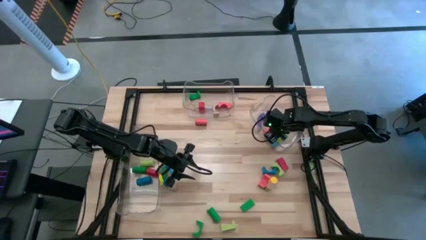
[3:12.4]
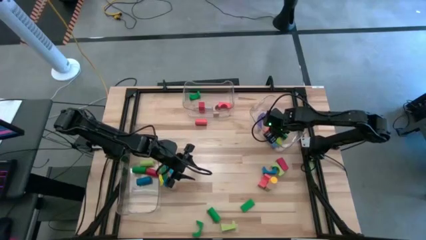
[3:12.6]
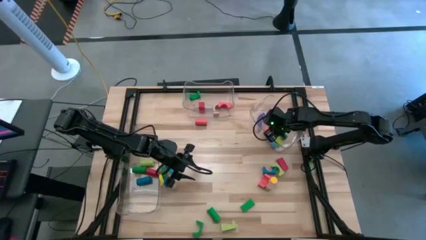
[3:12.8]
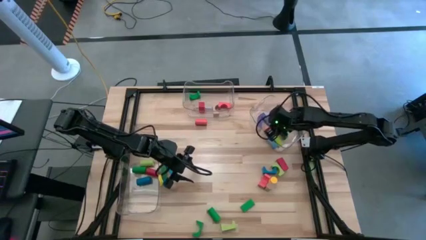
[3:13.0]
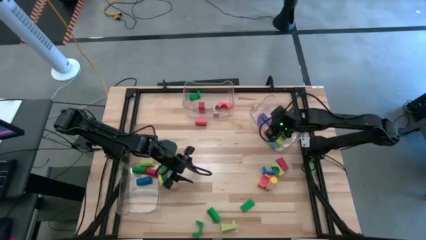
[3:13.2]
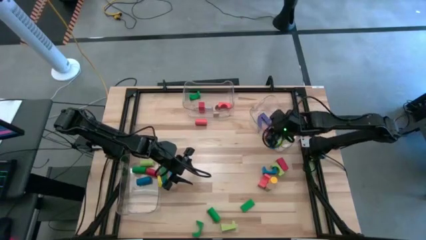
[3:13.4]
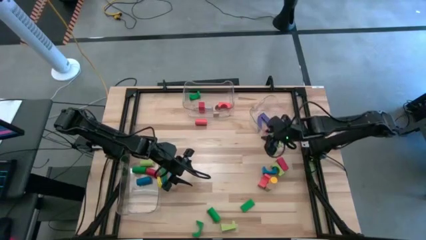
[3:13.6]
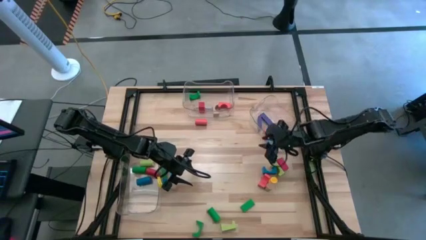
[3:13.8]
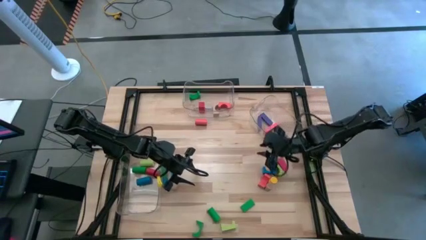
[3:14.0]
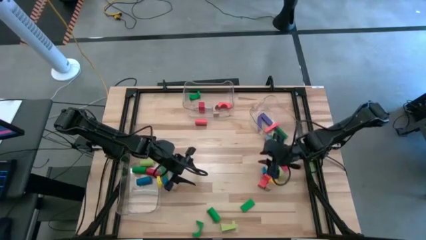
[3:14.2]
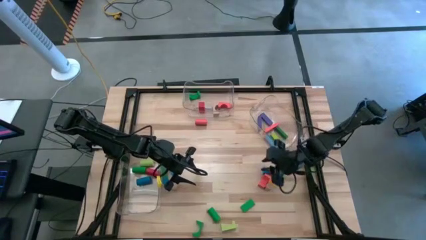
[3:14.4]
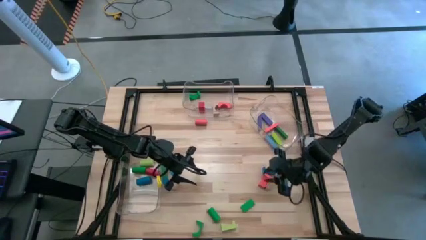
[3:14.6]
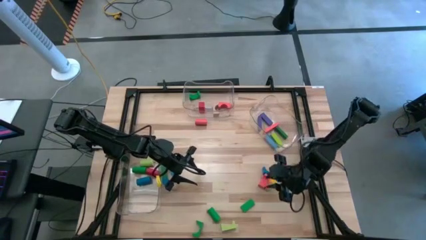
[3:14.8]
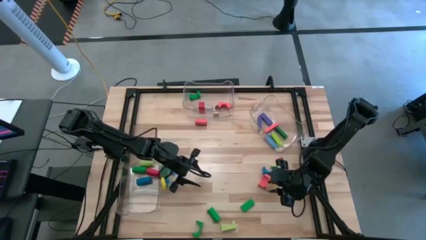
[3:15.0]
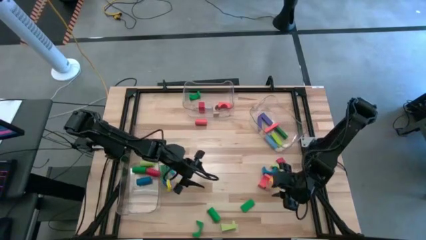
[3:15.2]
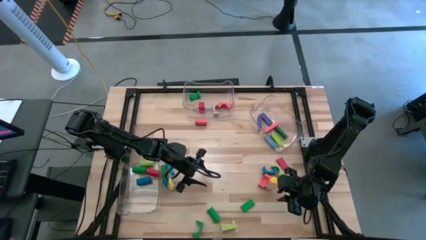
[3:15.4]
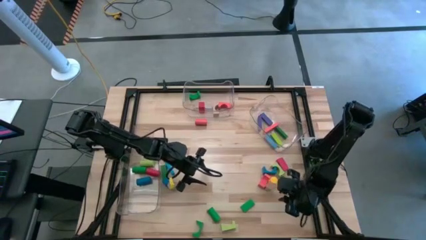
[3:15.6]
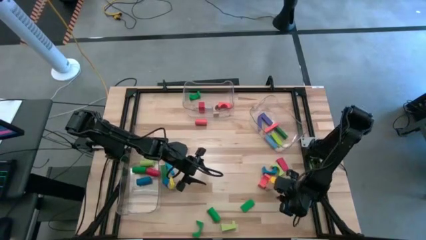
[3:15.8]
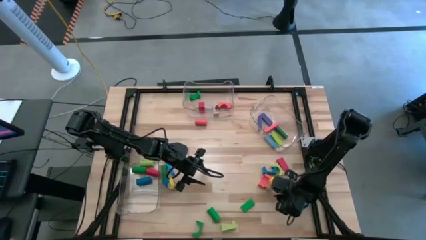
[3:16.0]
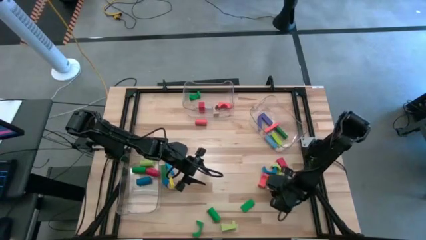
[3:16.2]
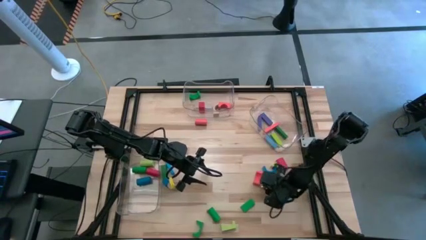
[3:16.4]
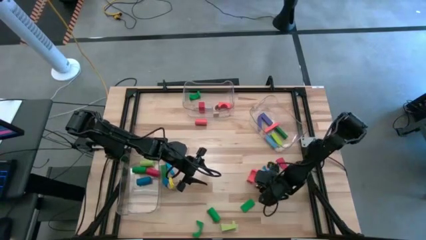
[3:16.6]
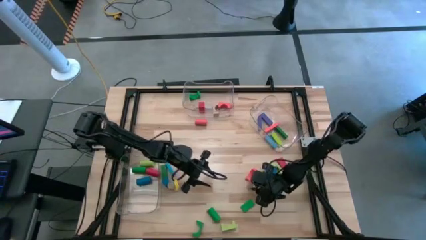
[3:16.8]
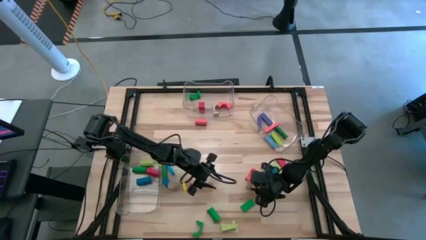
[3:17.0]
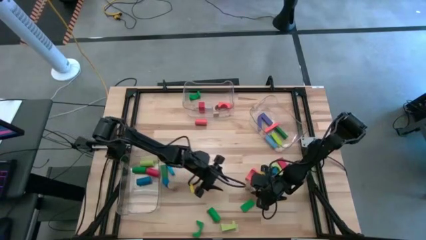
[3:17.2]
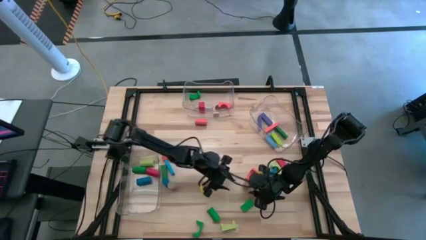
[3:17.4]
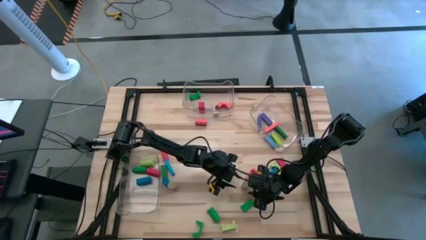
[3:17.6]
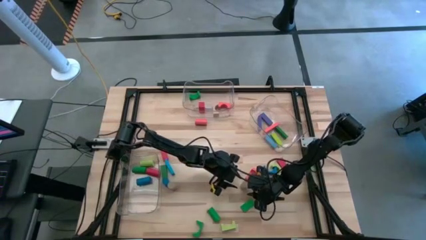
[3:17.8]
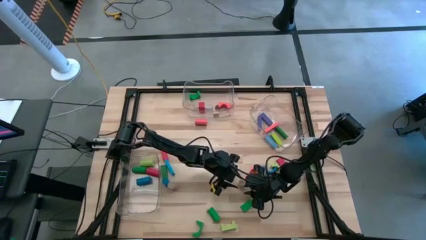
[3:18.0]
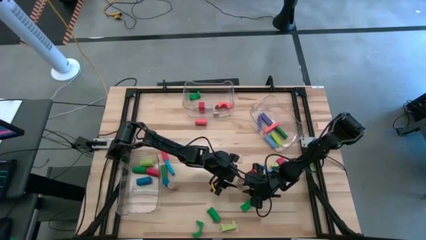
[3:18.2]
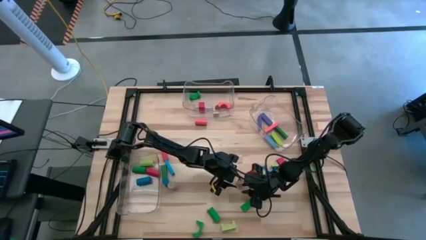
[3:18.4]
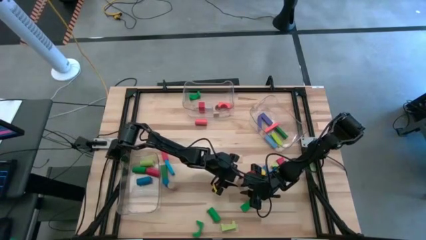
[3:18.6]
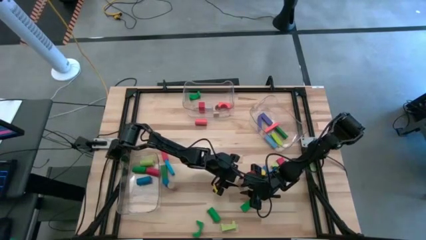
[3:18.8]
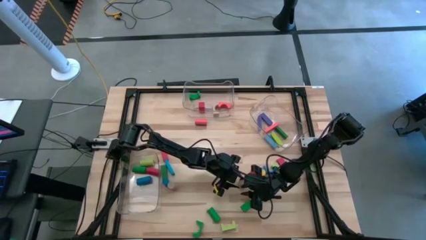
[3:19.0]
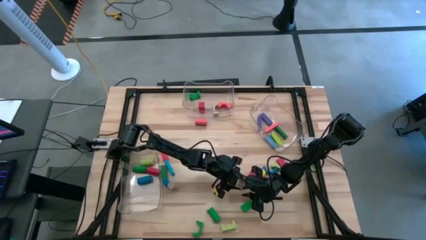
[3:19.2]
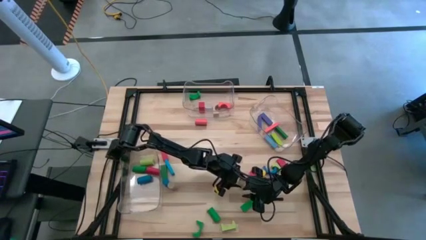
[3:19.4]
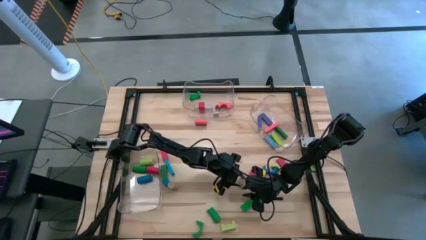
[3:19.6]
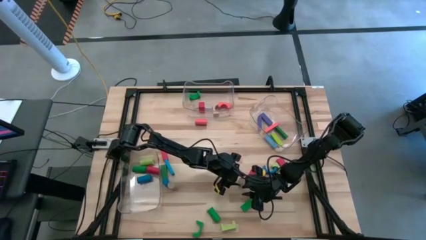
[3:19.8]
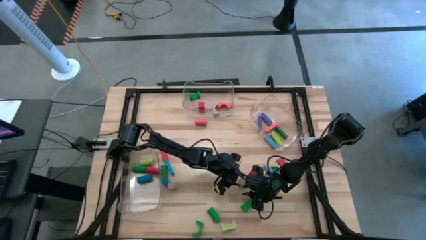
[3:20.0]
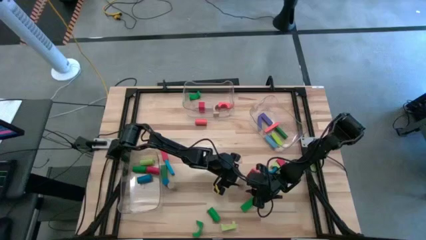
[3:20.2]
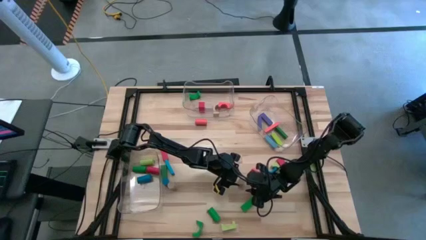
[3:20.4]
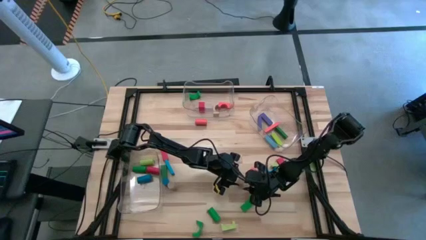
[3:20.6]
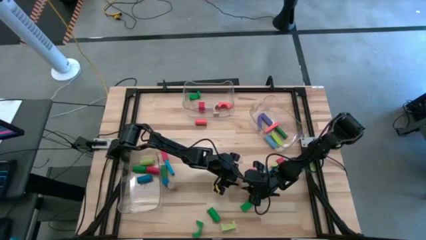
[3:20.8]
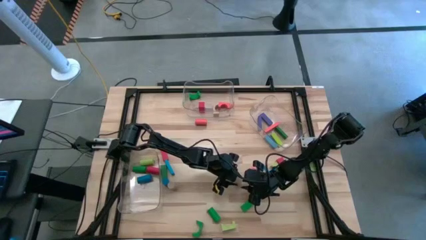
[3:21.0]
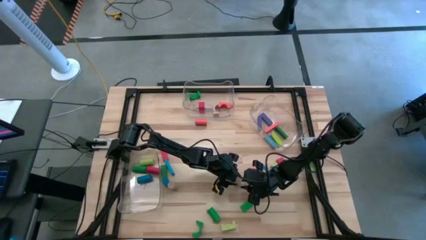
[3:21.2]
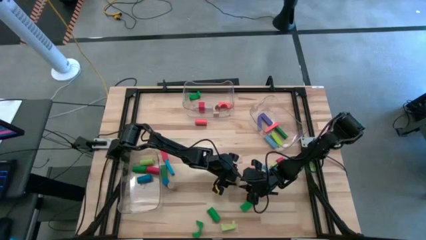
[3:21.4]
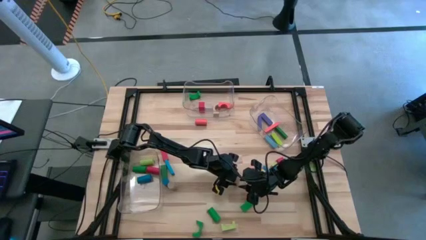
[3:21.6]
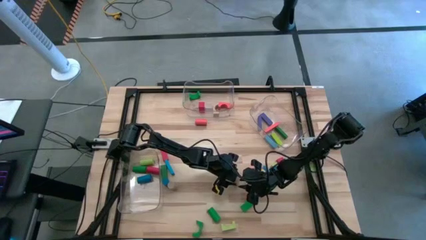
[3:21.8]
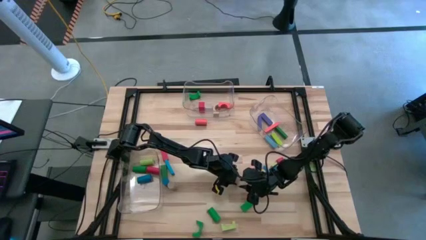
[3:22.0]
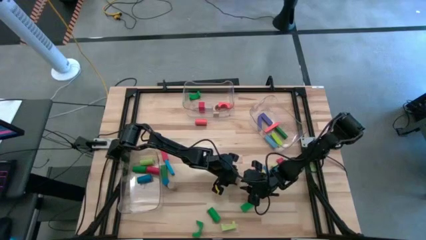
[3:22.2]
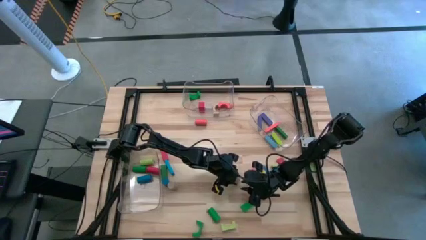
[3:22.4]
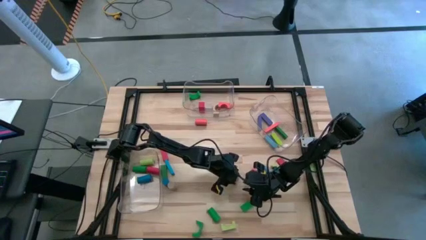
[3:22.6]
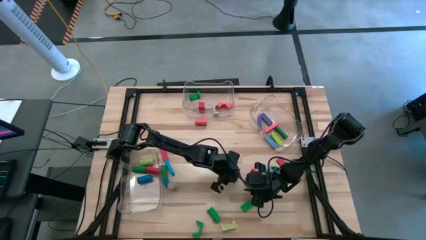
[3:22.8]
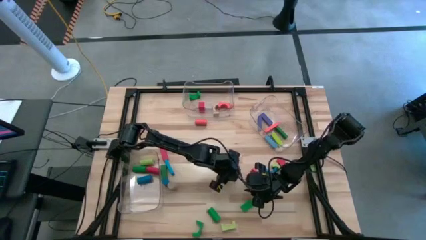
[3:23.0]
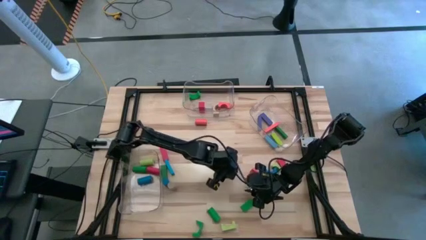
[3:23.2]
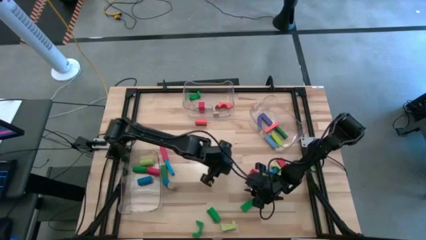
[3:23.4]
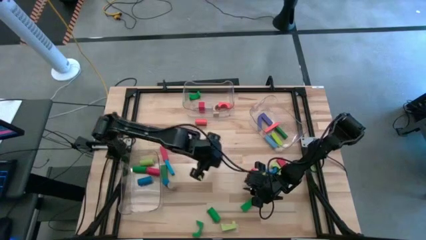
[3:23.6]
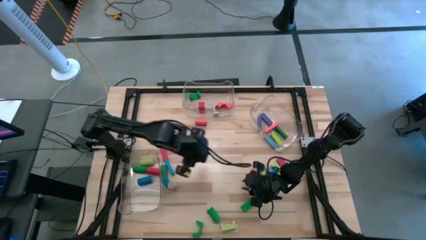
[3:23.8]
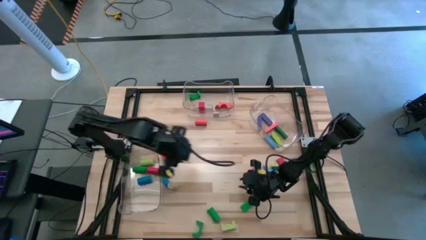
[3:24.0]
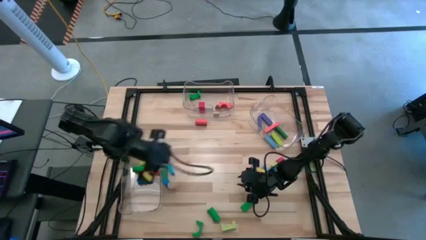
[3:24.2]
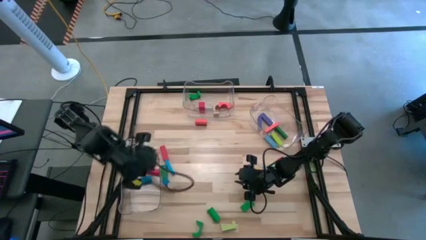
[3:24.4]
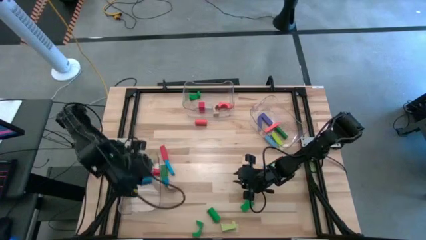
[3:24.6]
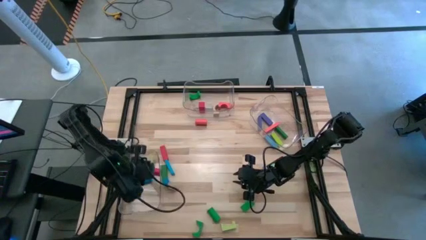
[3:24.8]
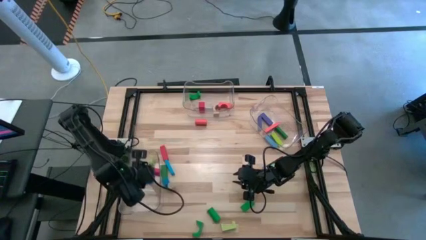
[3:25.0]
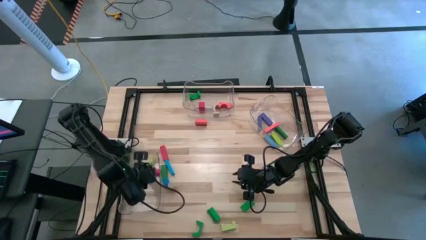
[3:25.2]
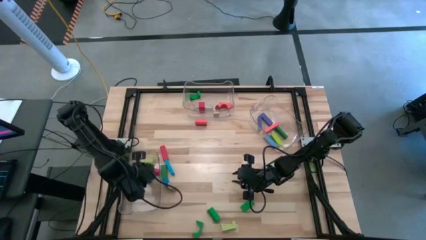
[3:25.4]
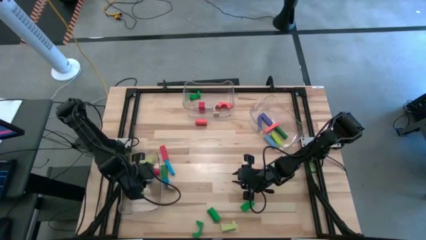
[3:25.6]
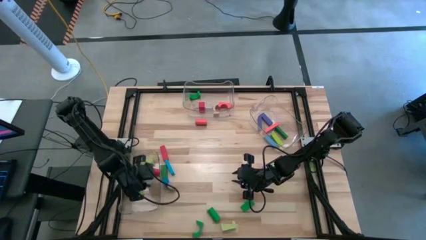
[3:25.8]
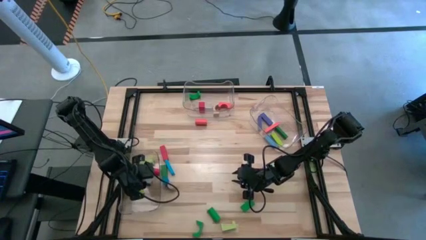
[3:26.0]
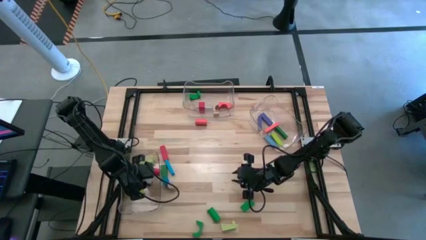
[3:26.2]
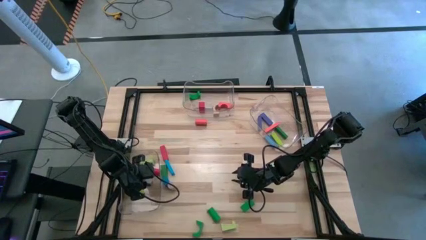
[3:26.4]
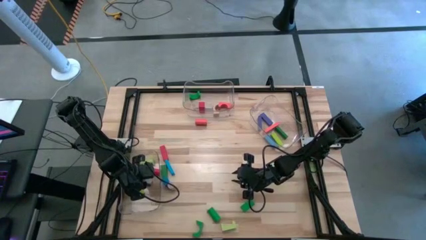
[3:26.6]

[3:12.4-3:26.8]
Task: Sort blocks by size
Put the brown cylindrical block into the left transparent bin
